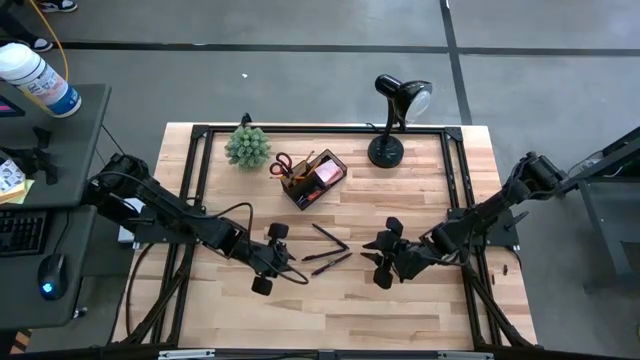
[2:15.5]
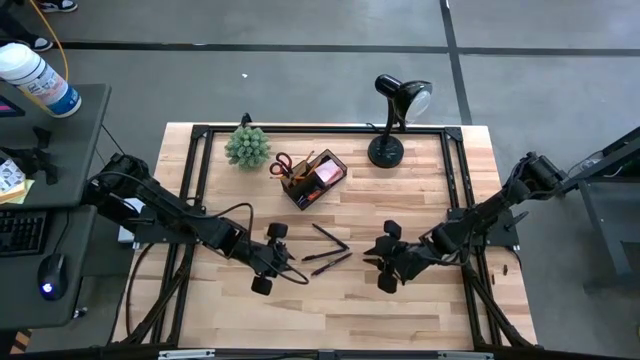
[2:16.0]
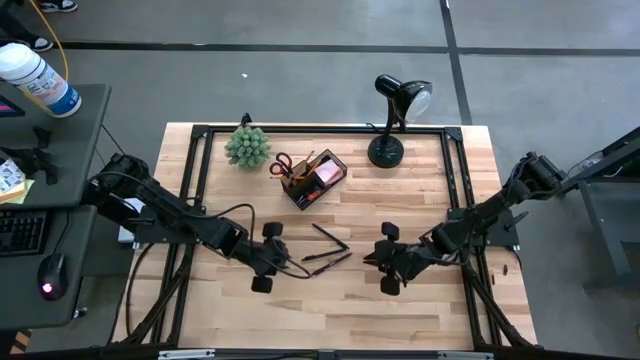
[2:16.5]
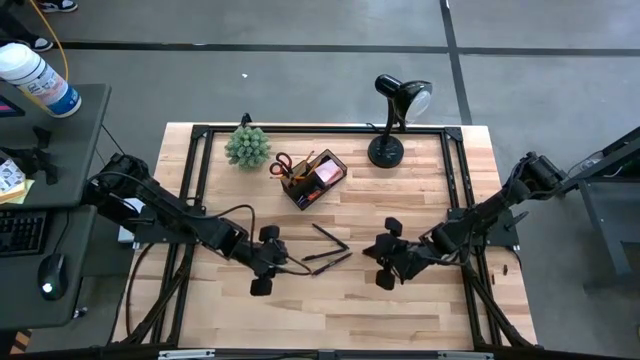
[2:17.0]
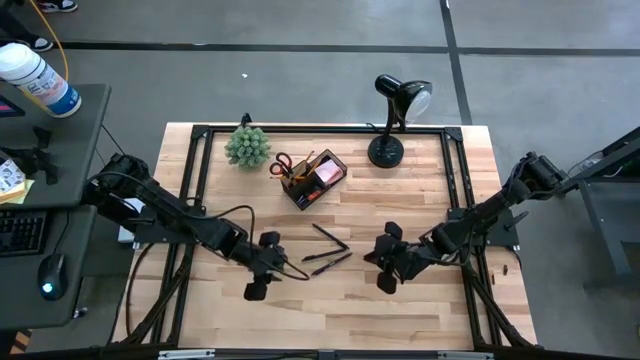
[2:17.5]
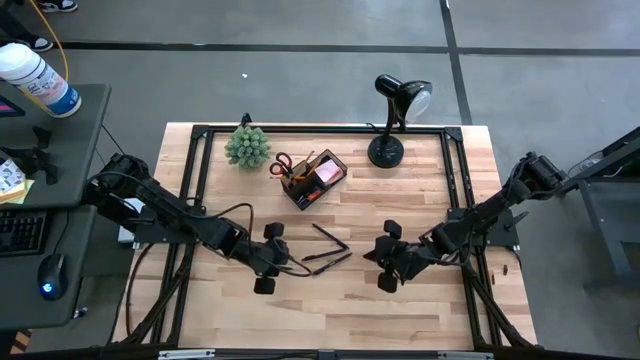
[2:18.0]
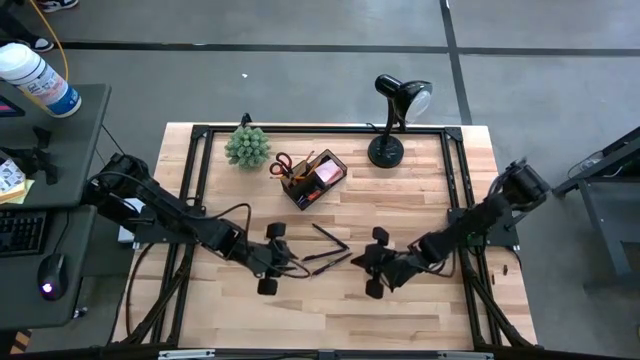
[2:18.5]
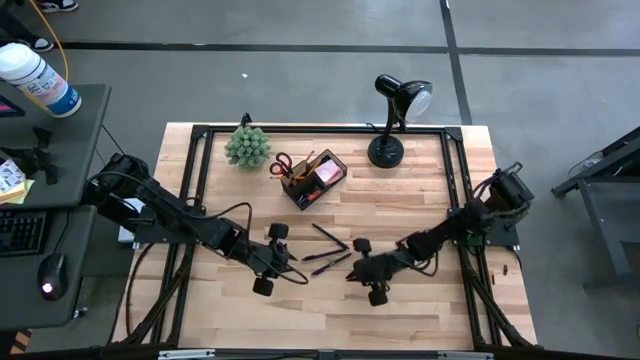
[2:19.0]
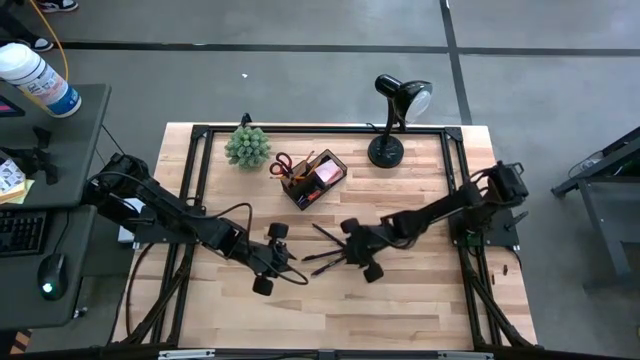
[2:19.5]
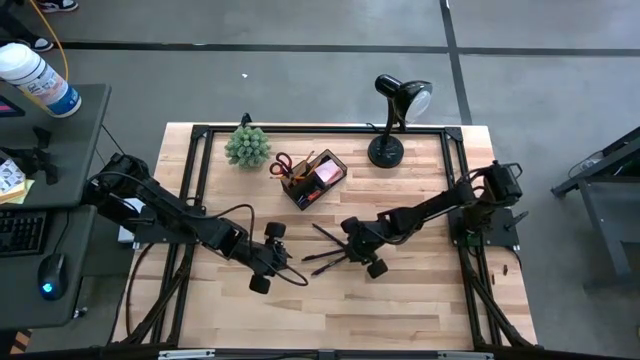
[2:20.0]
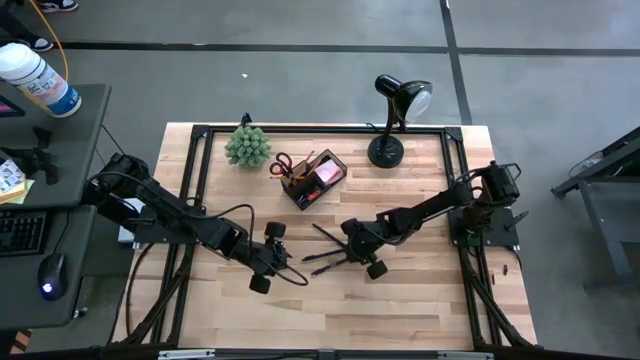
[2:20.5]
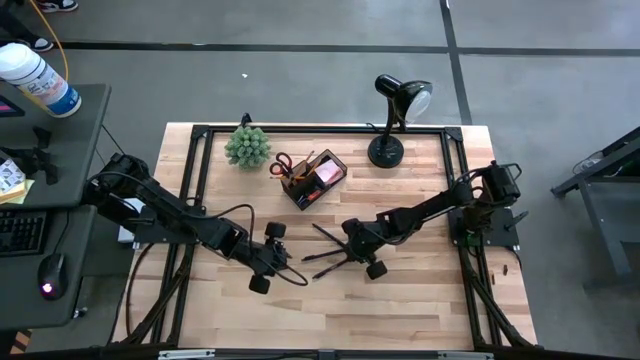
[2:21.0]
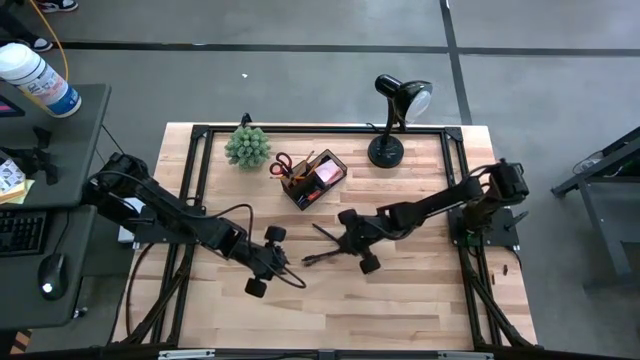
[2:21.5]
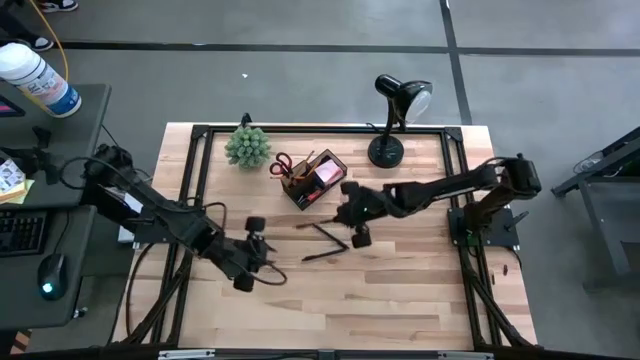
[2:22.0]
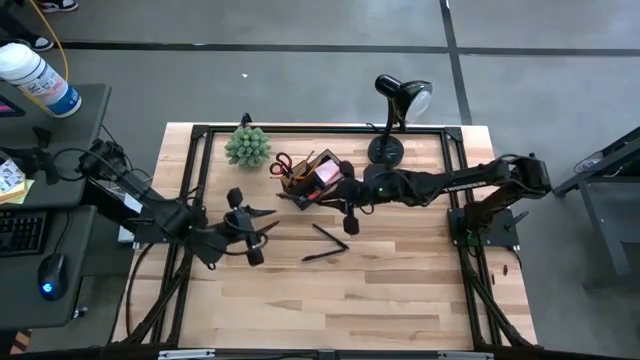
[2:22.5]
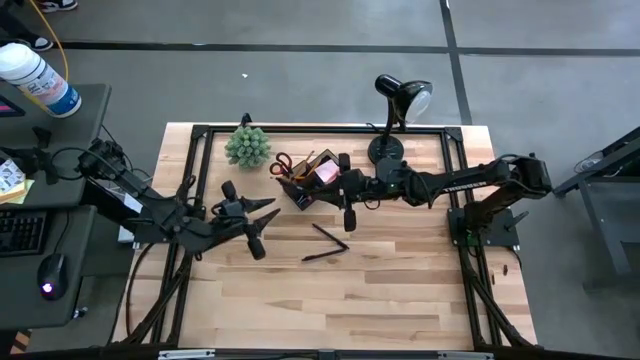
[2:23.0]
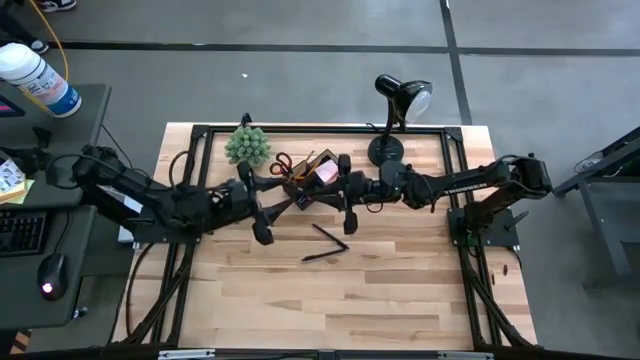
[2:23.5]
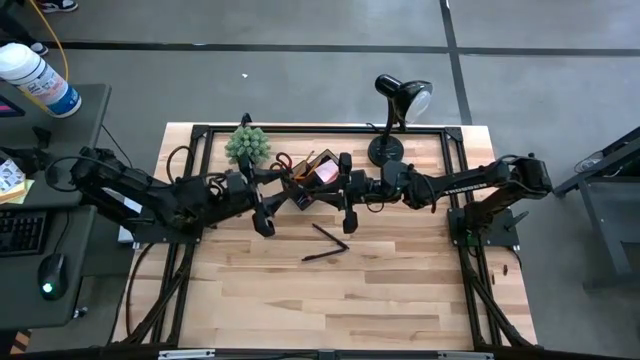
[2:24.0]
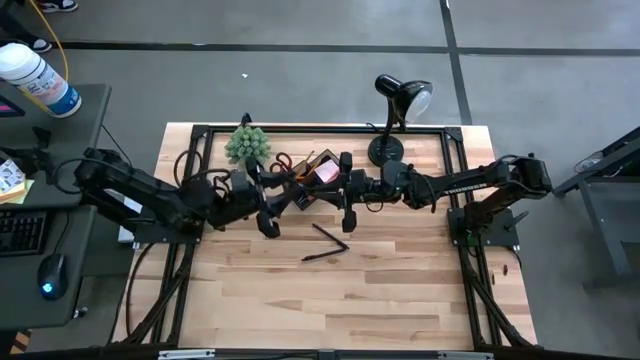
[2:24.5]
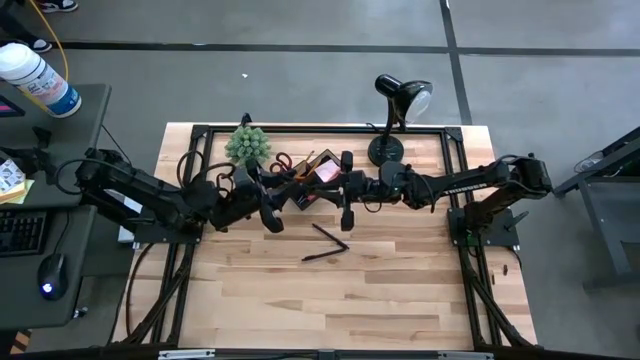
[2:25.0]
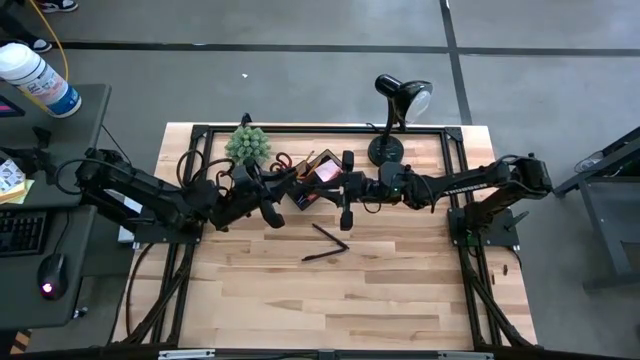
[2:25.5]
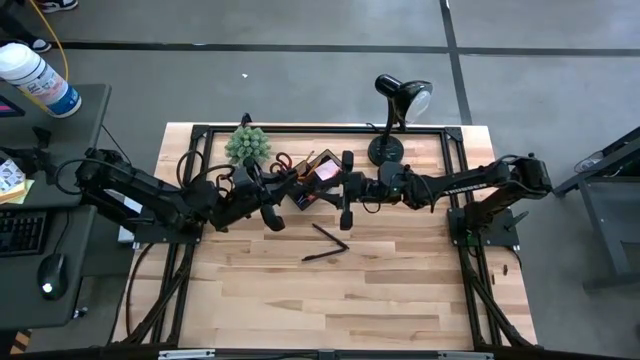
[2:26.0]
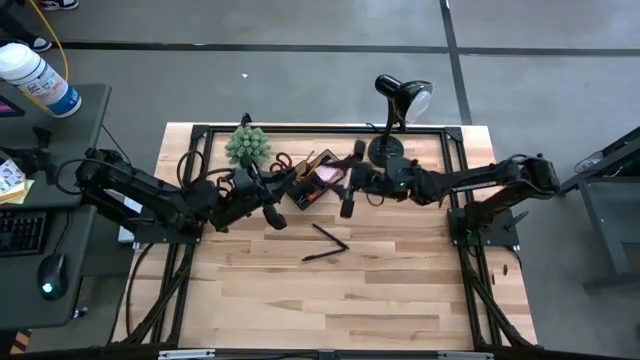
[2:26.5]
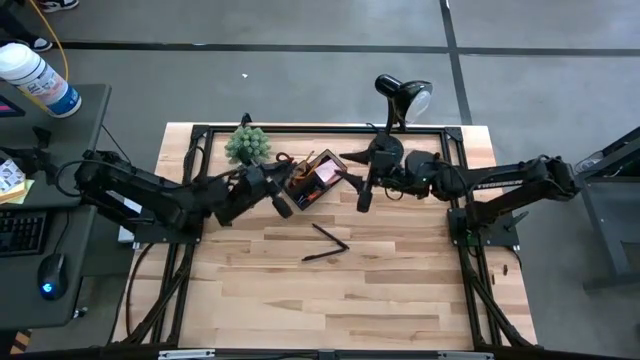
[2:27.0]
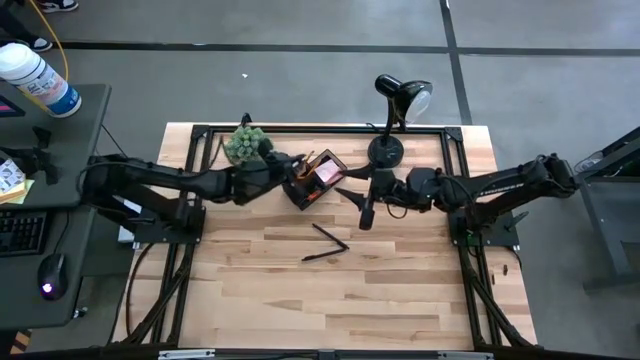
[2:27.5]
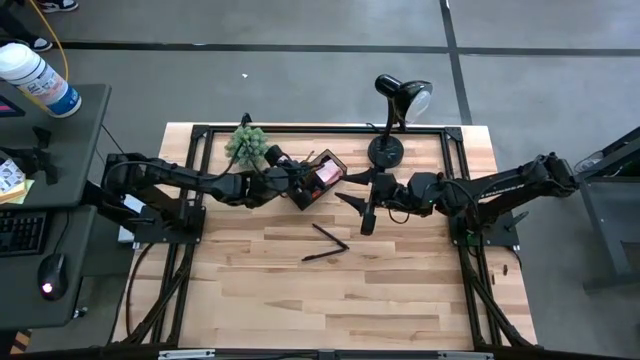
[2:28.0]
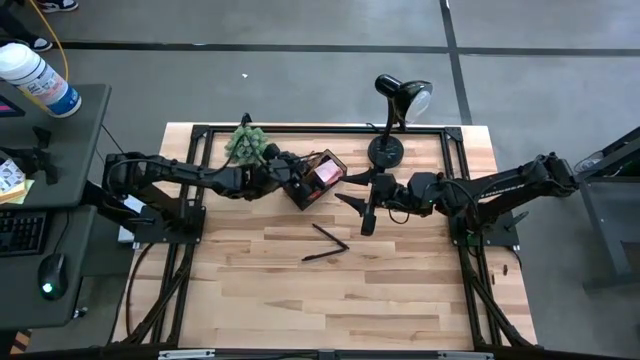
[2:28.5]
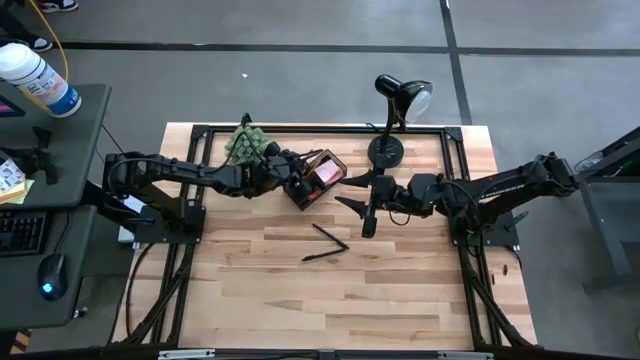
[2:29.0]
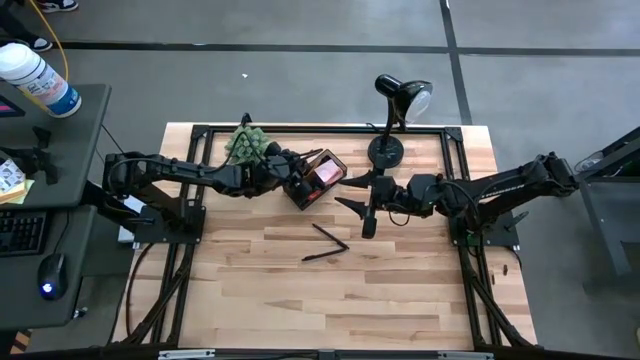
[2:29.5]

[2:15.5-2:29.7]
Task: Pick and place office supplies into organizer
Put the bottom black pen into the black desk organizer

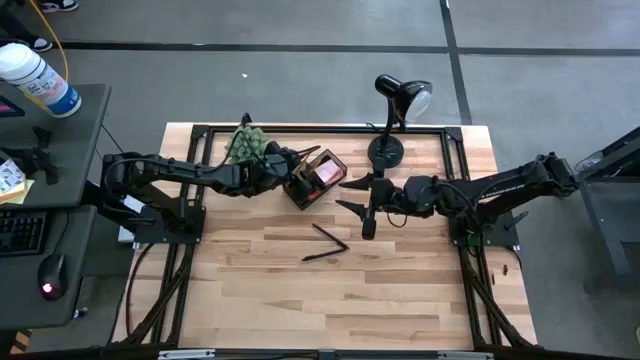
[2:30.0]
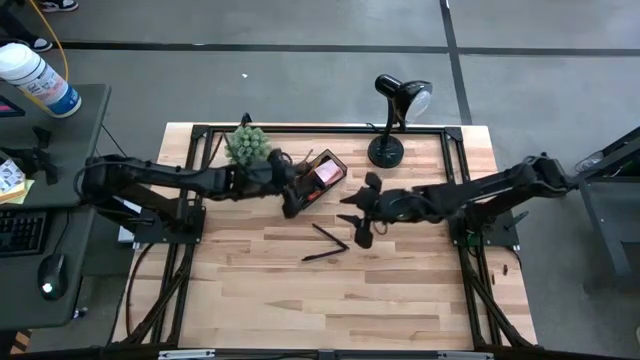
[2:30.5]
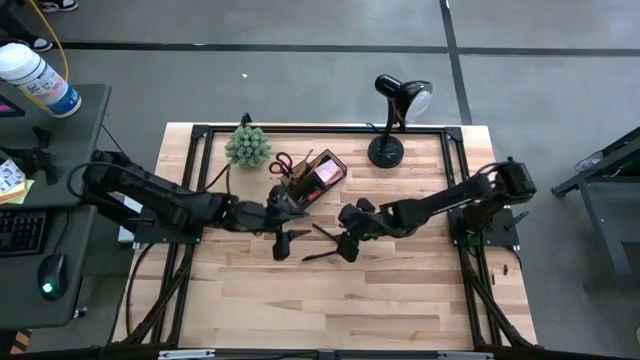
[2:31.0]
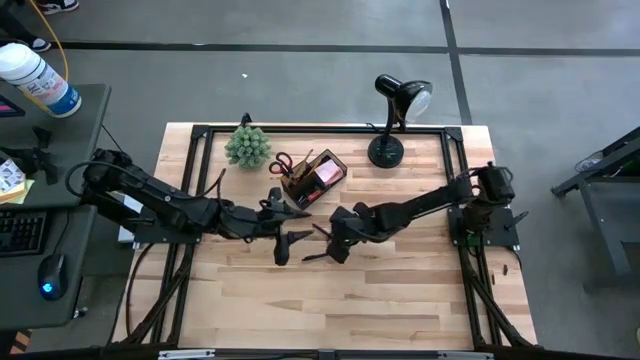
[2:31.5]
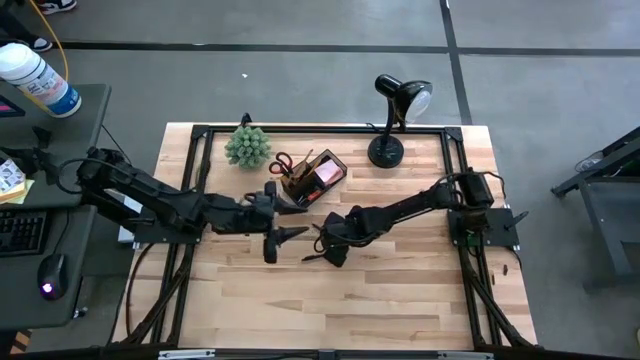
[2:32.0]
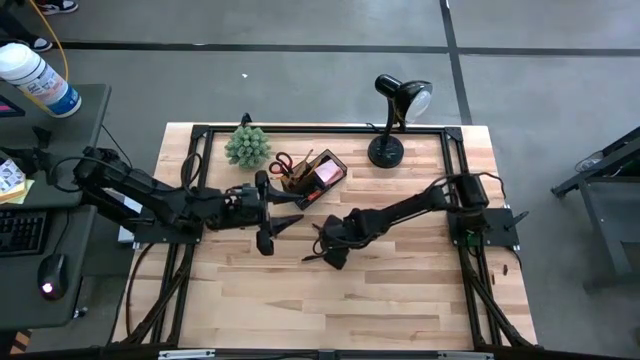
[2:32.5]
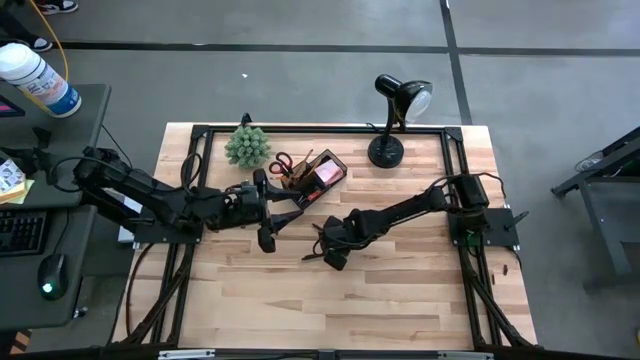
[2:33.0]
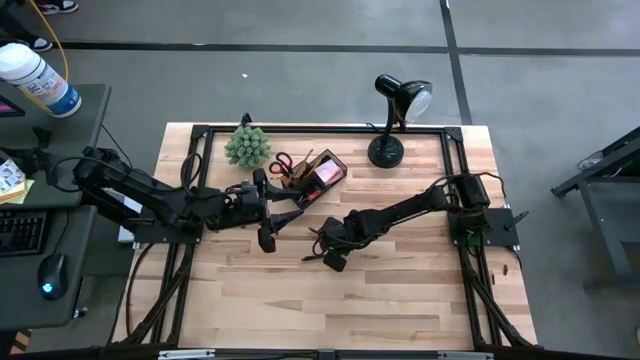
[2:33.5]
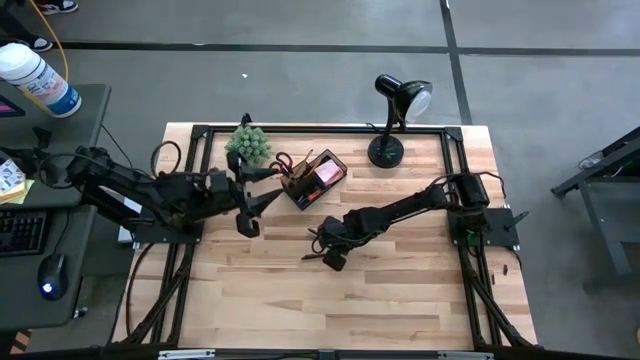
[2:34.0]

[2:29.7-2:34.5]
Put the top black pen into the black desk organizer

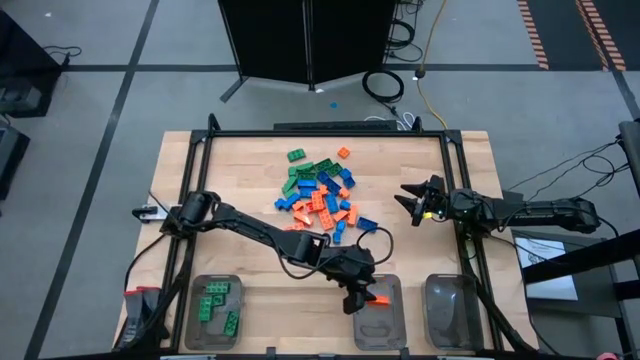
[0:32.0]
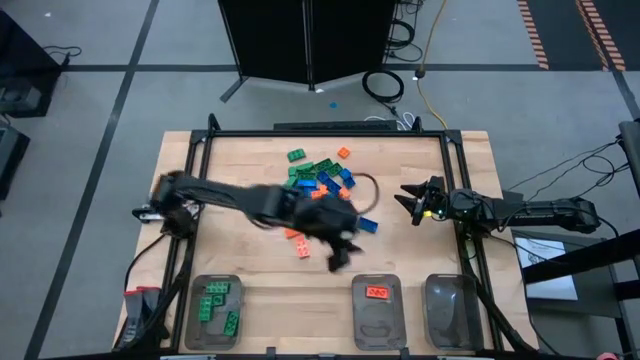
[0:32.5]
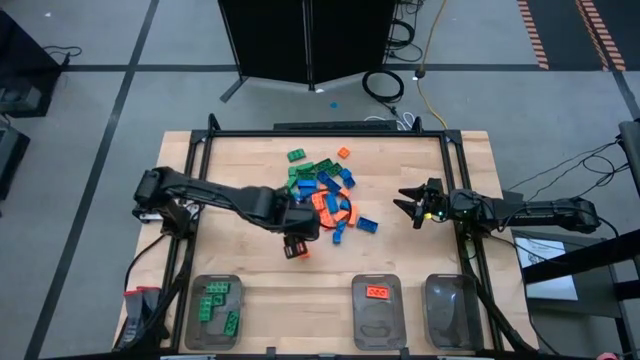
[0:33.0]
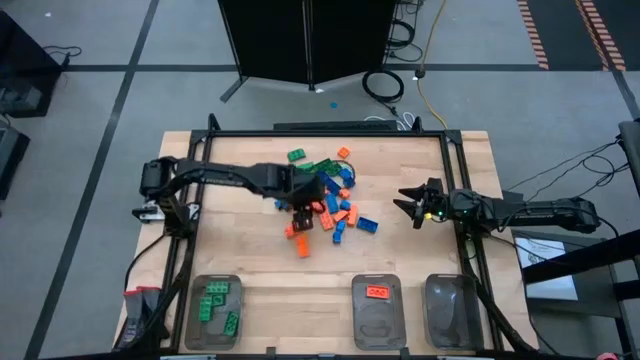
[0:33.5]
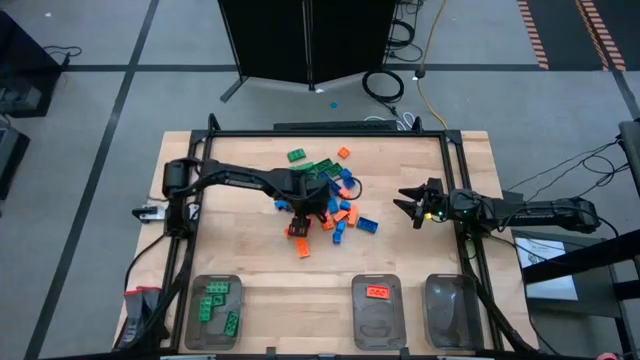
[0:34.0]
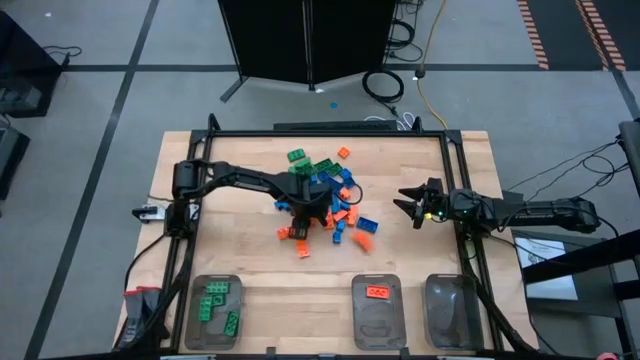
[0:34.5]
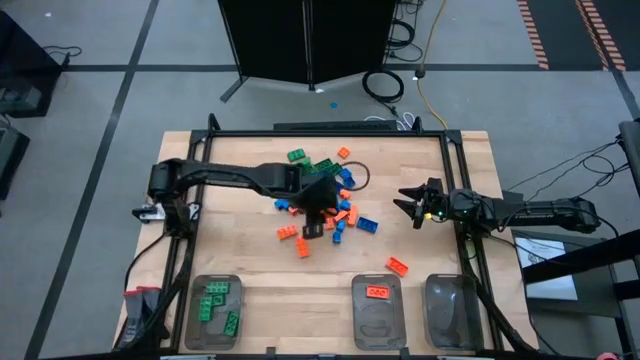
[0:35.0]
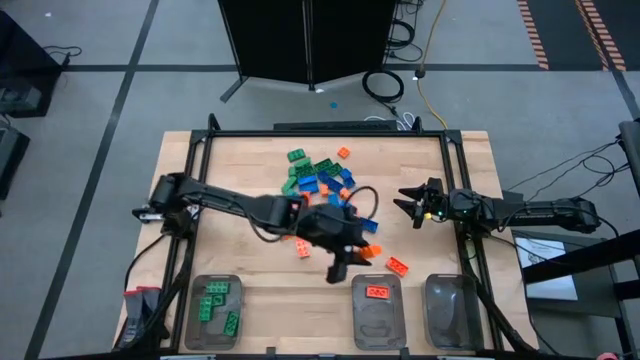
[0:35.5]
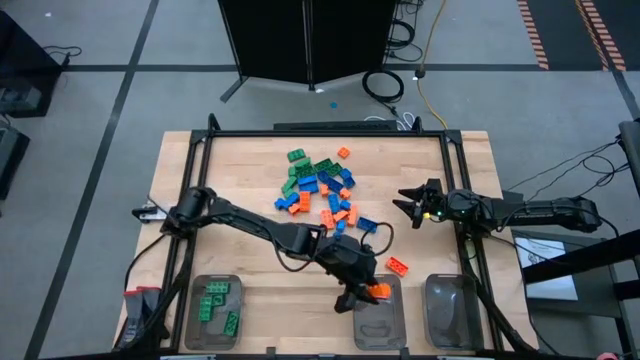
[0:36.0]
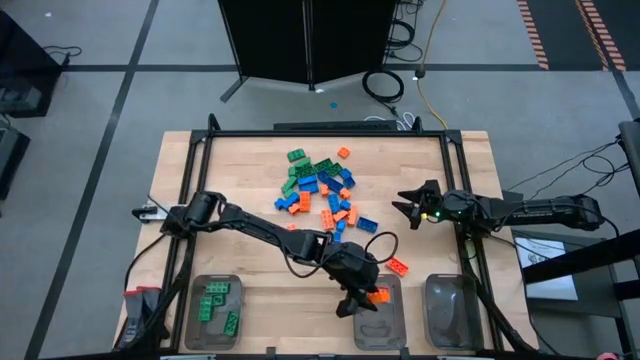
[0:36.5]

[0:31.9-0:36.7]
Task: Sort blocks
Put the orange game piece into the center black bin
